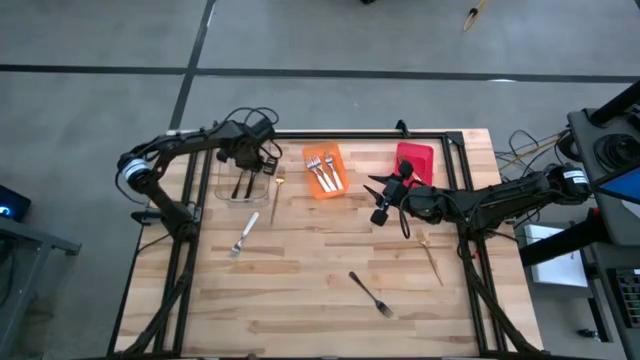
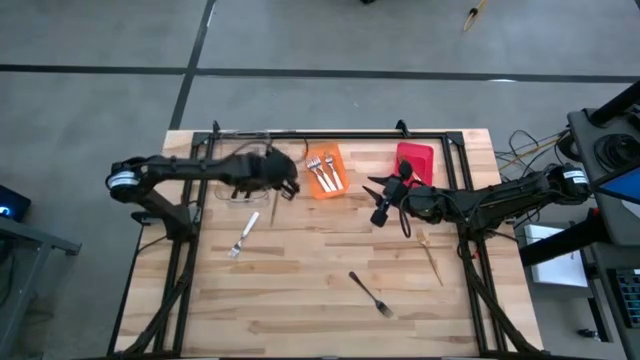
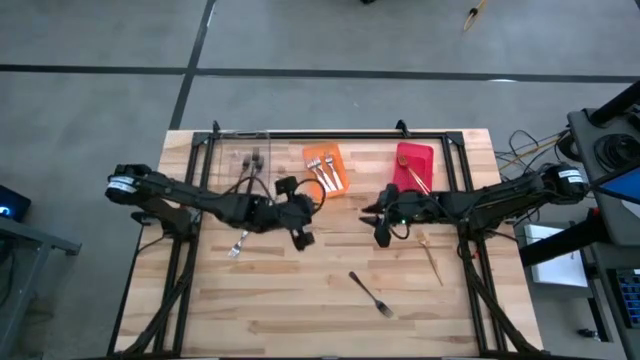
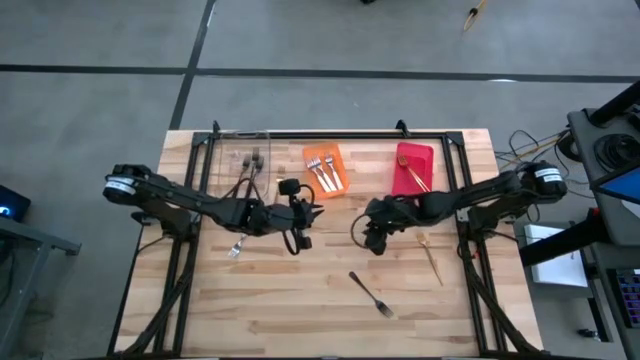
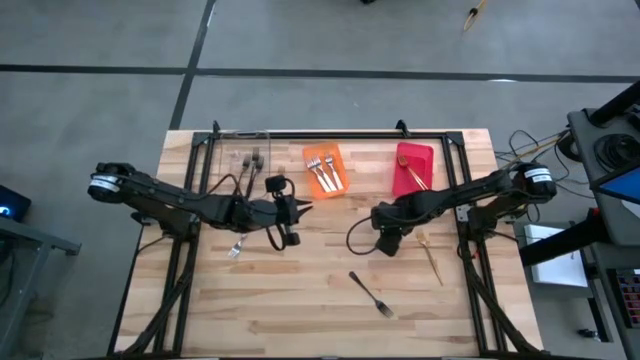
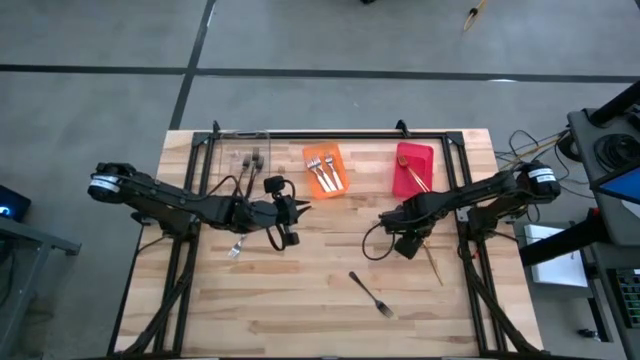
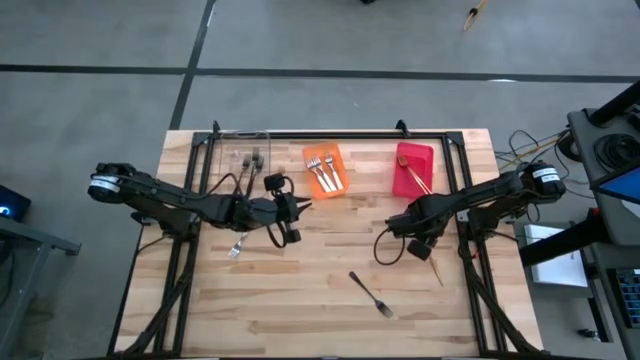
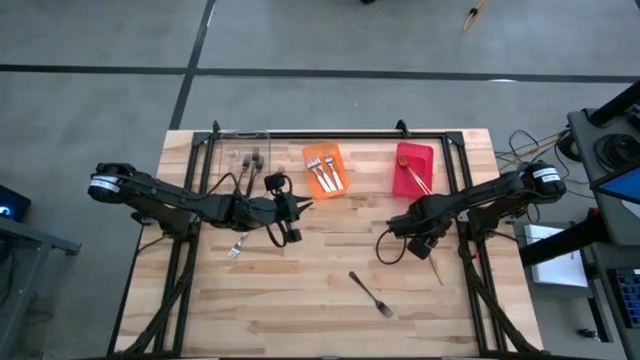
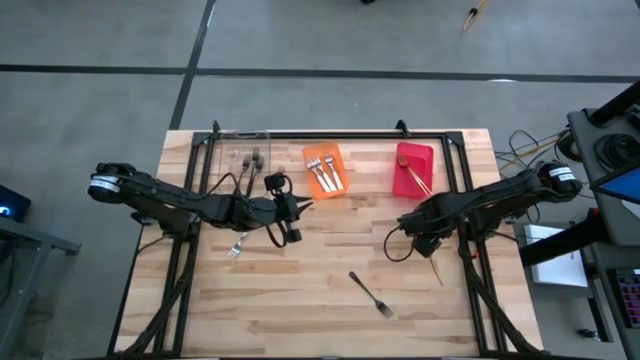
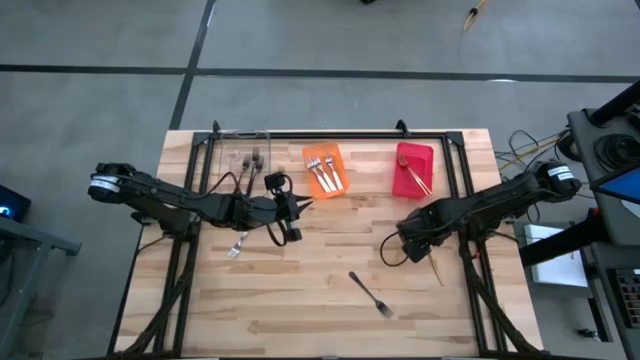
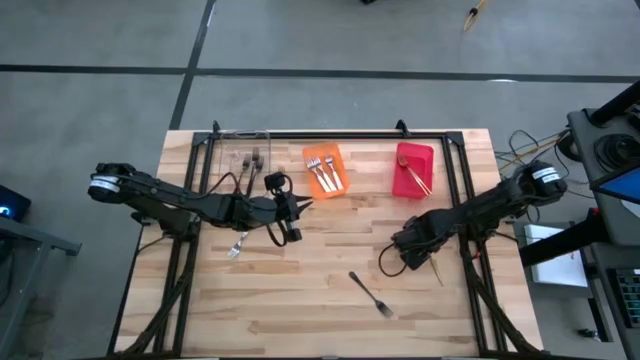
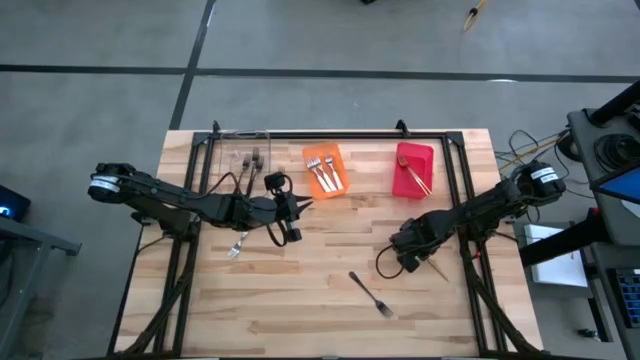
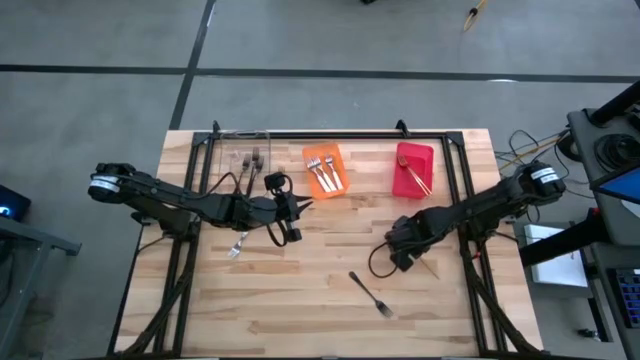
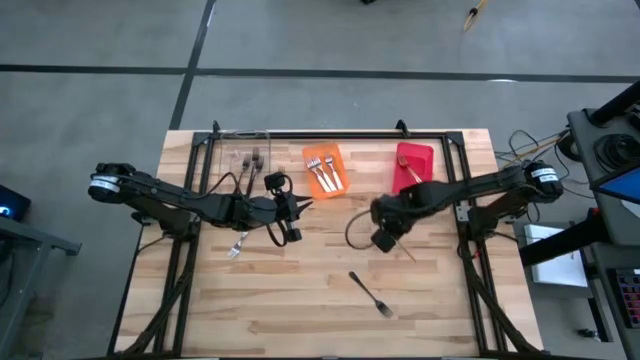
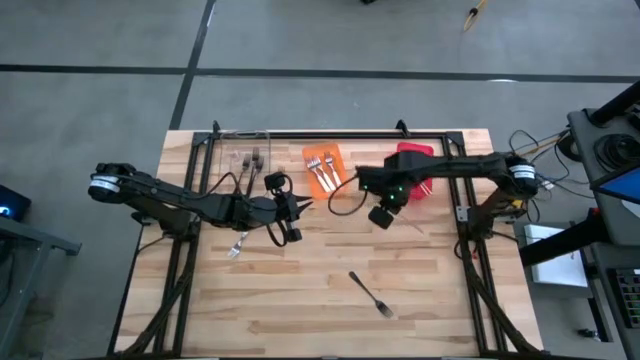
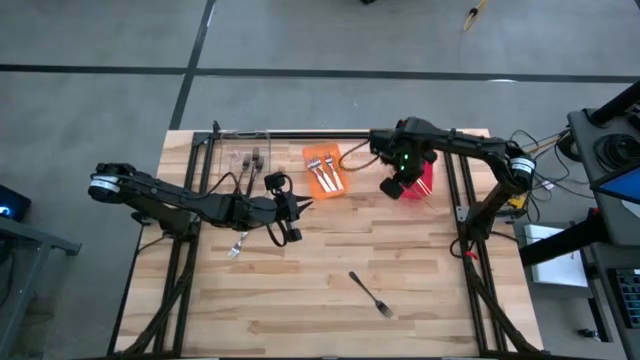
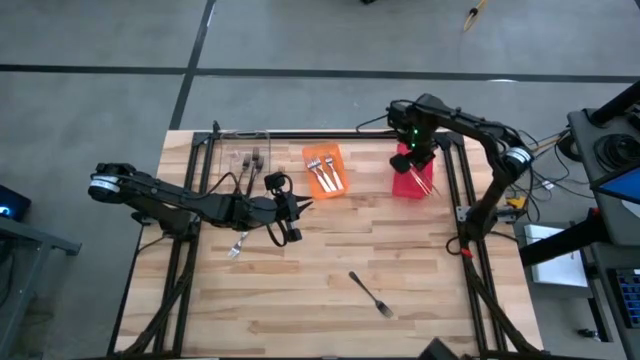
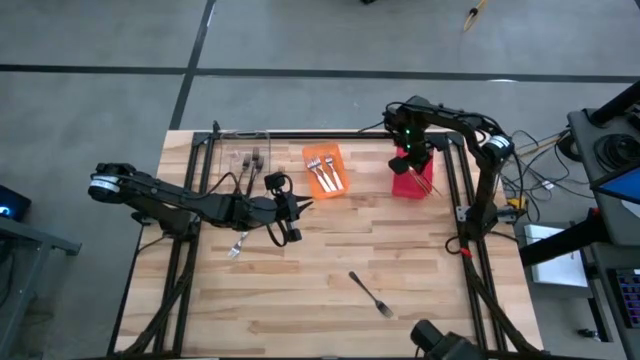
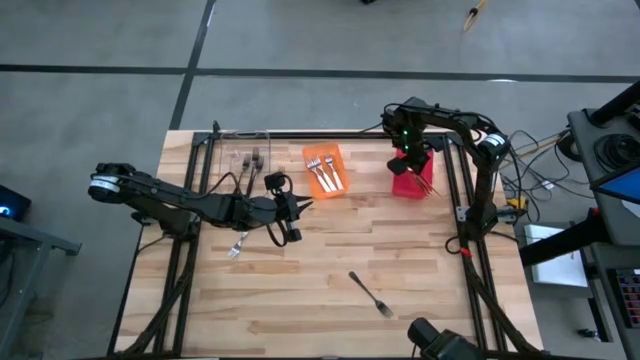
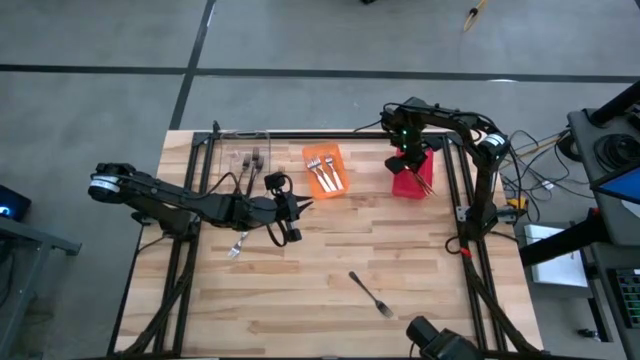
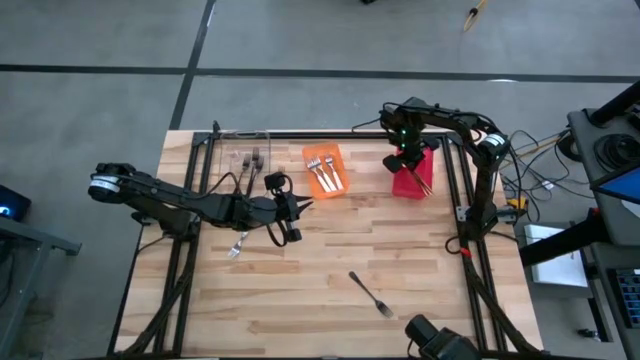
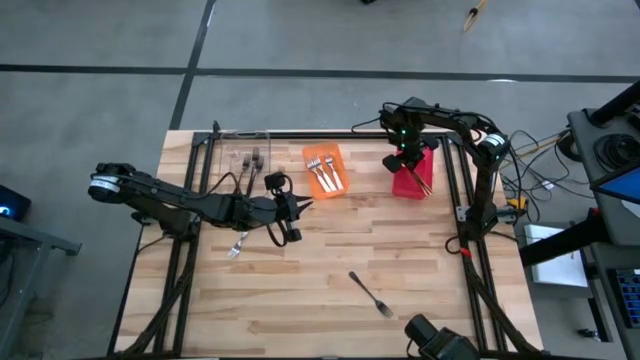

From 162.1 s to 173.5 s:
Task: Sort silverware by color (type)
Put the right gold fork into the red bin

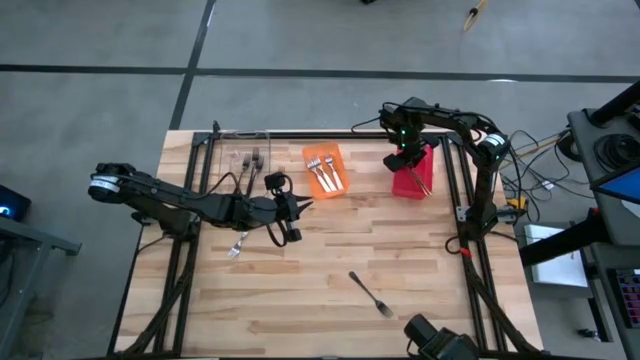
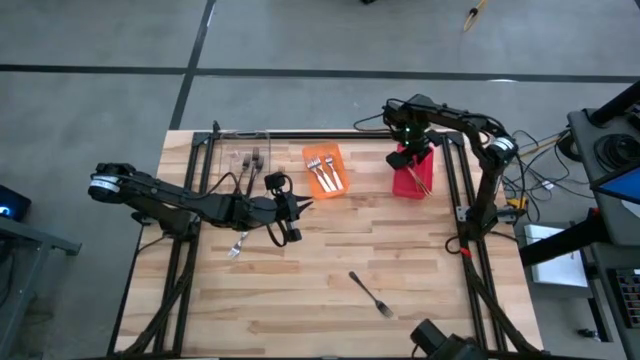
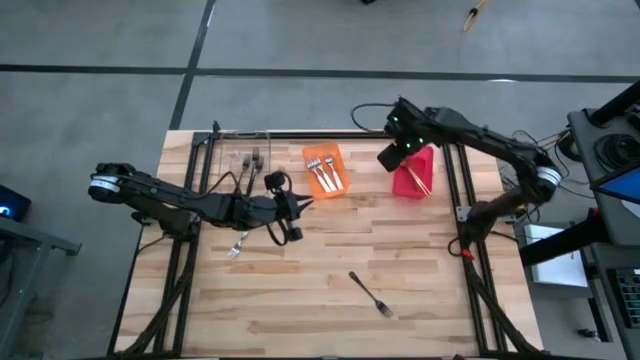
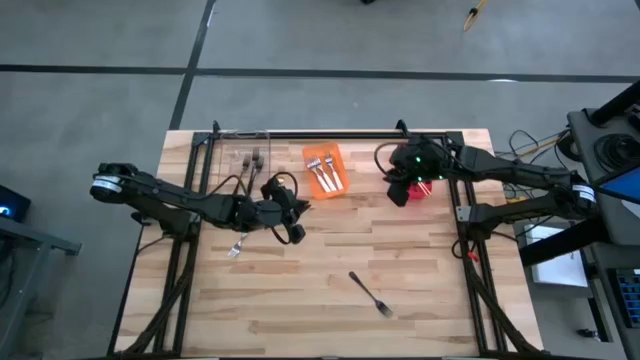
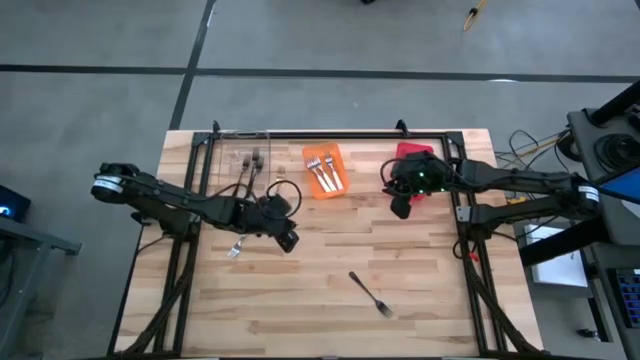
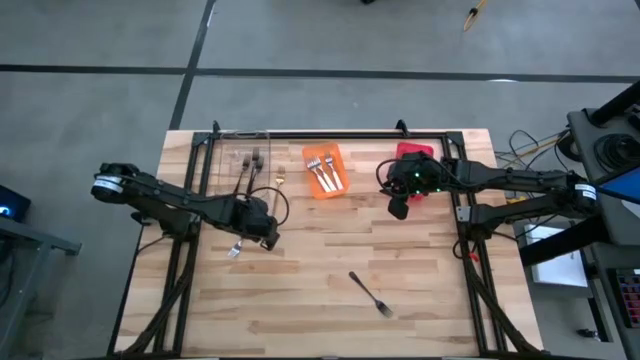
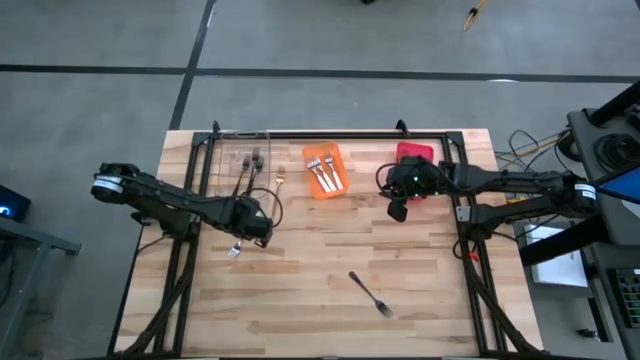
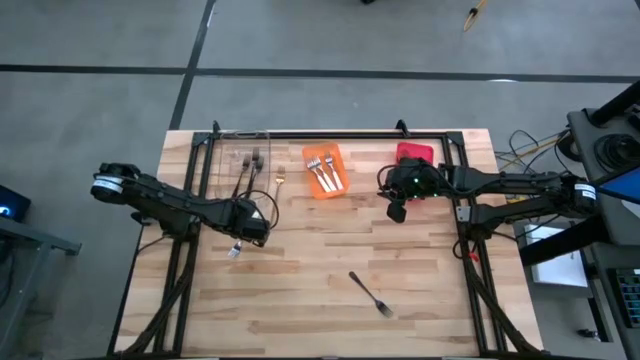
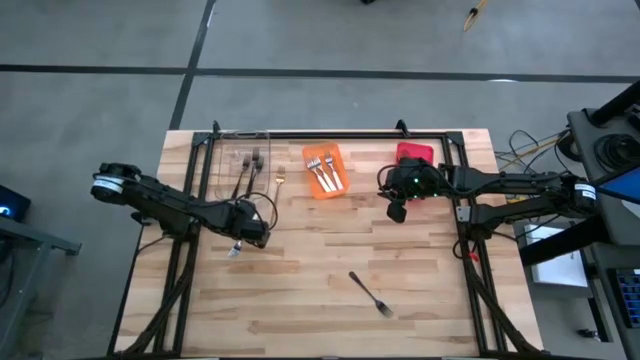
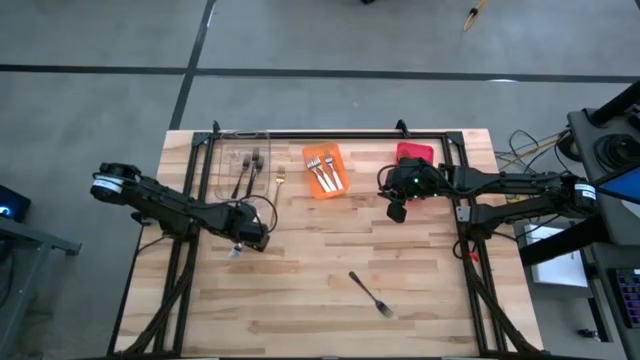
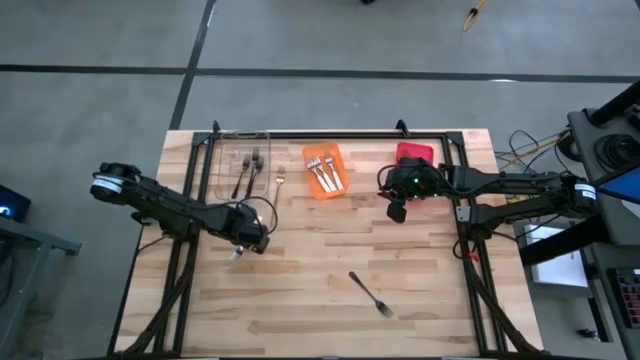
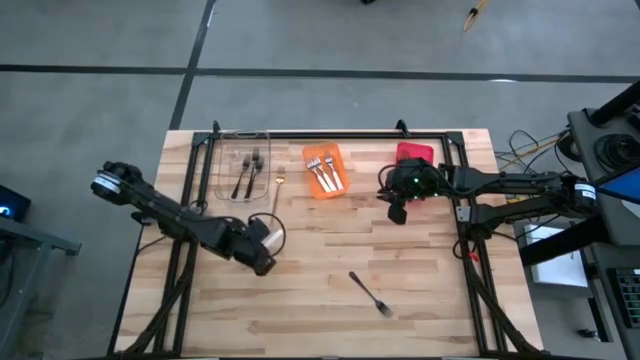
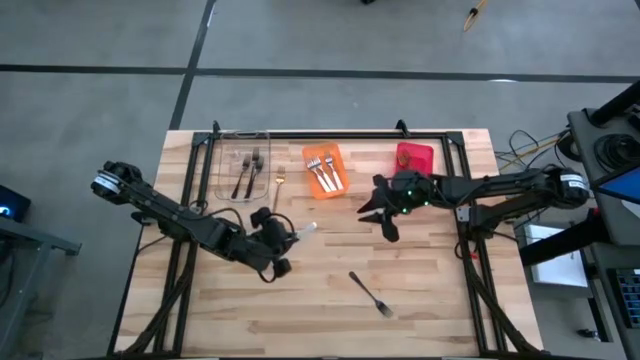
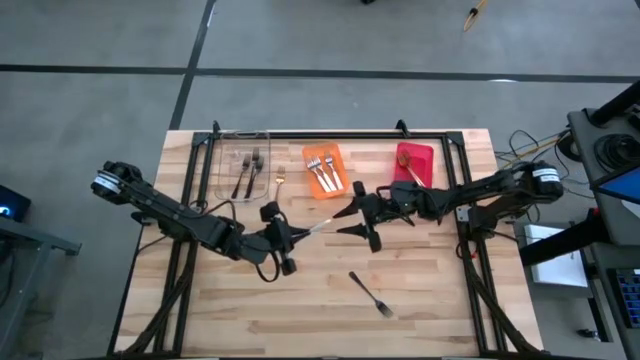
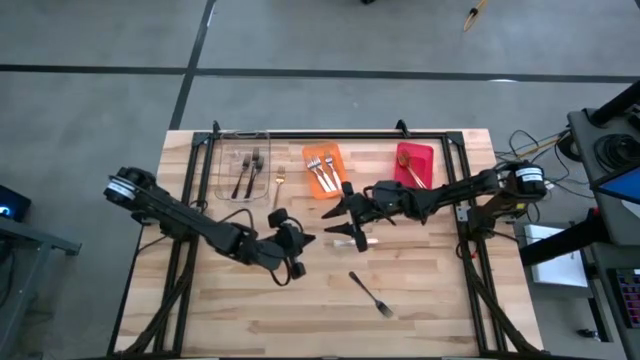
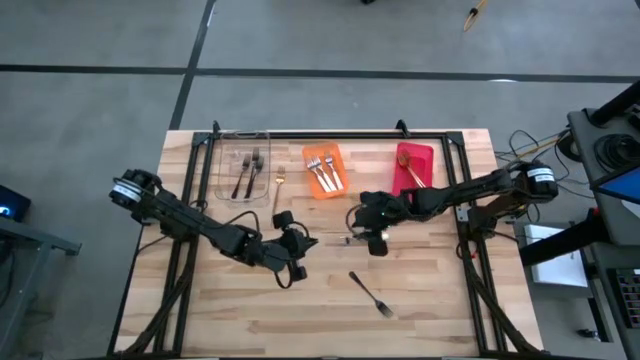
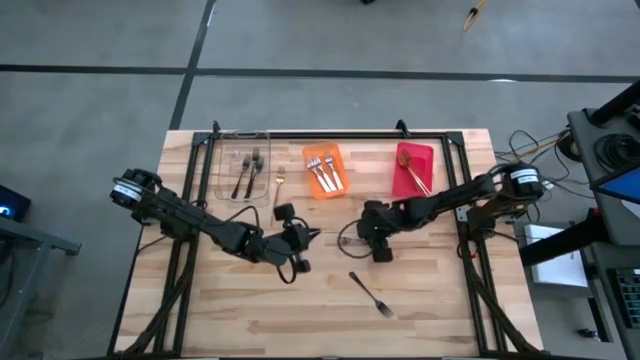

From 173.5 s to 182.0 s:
Put the white fork into the orange bin
